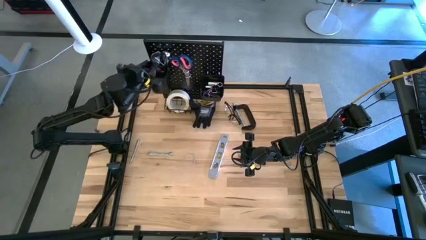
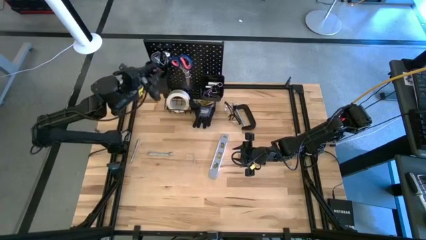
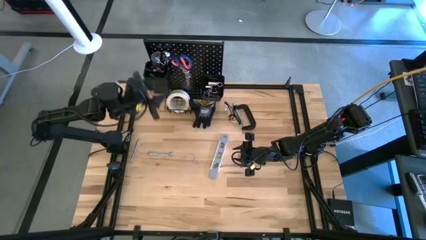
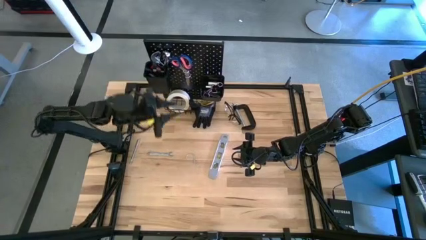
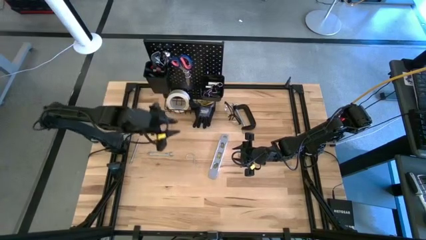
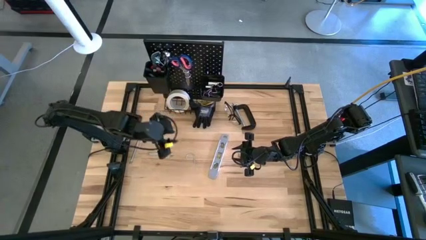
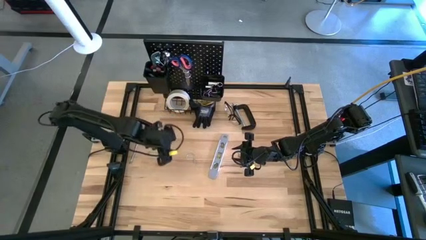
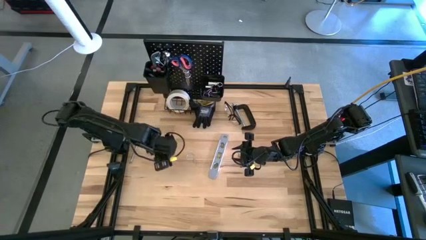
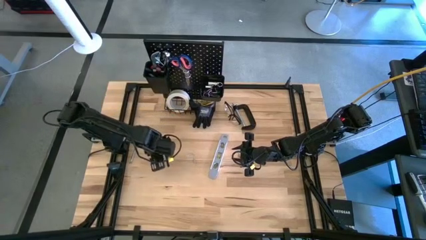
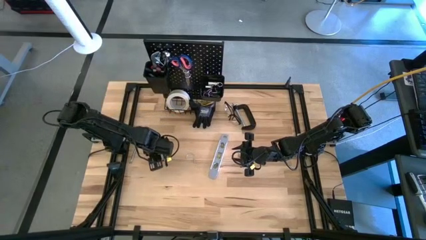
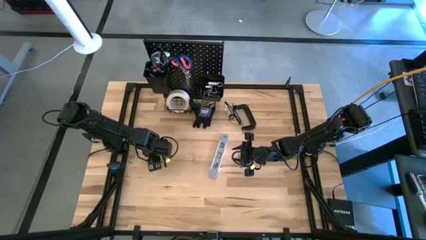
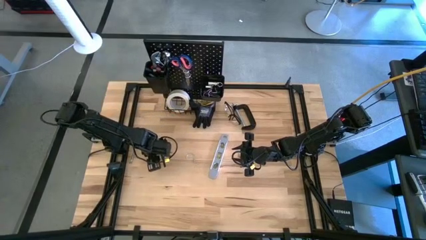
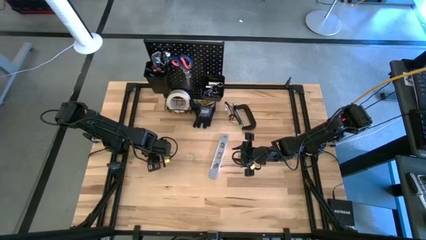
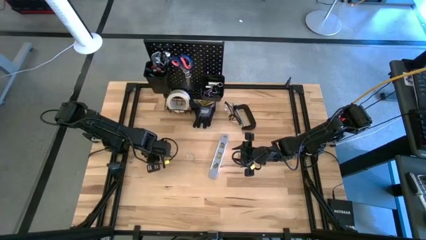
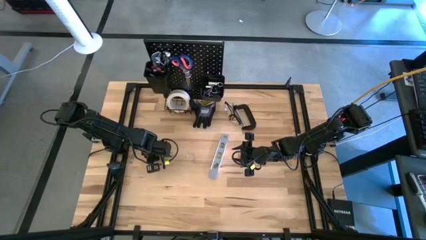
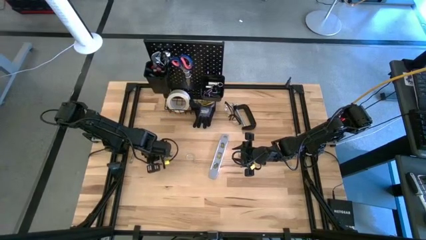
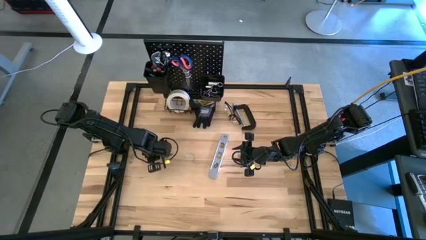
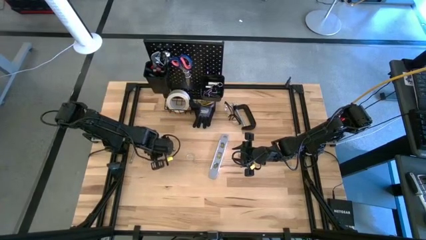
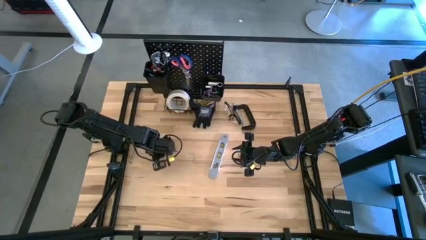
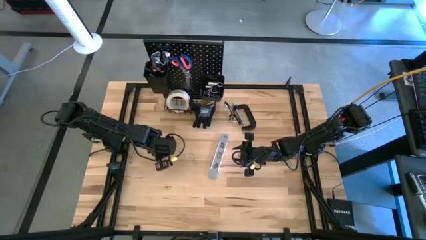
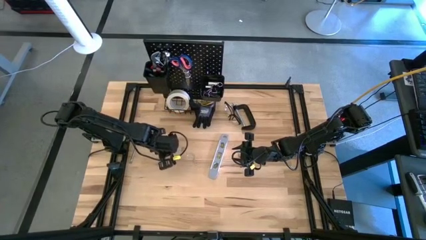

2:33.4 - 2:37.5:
Task: Hang tools onto peg board
Put the wrench into the left black bin on the pegboard

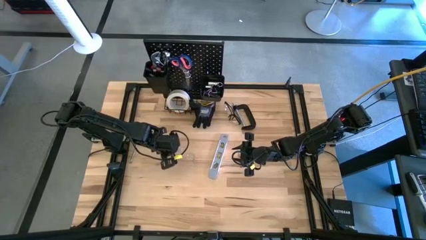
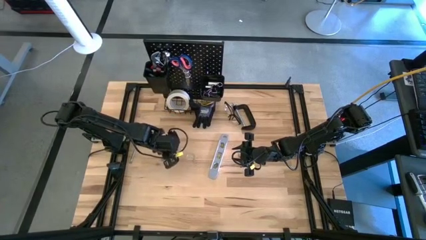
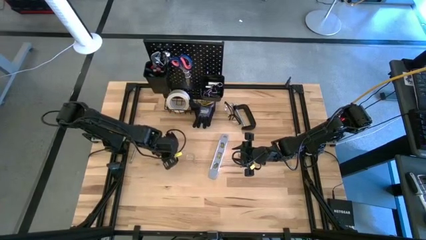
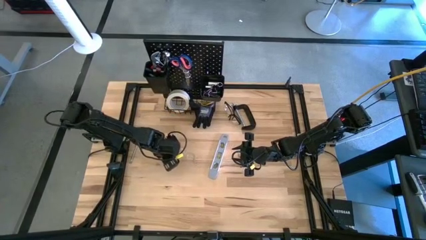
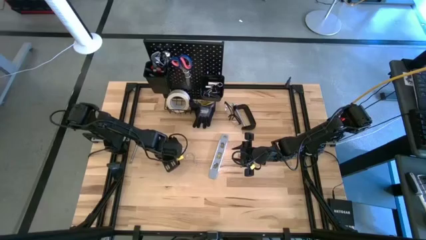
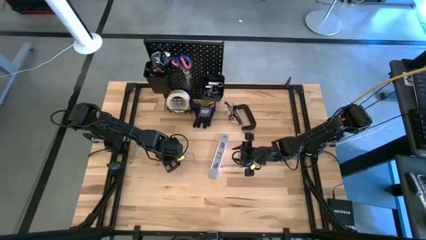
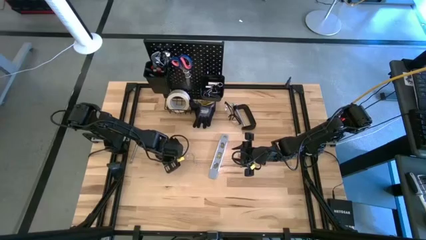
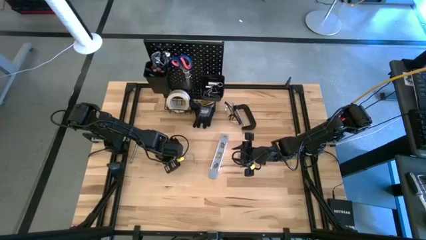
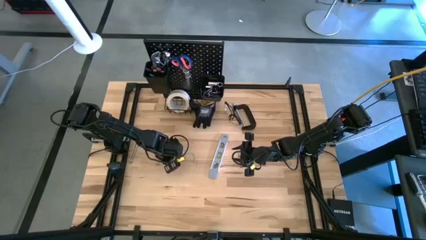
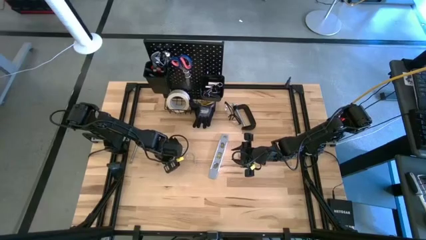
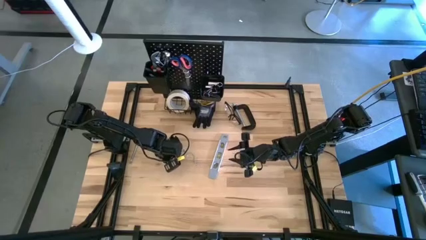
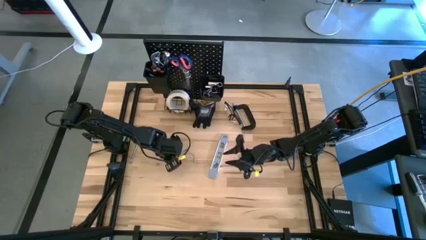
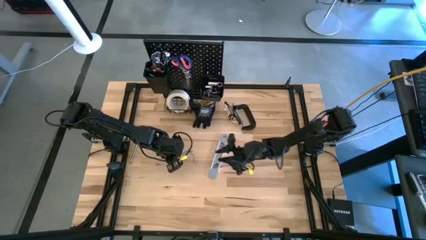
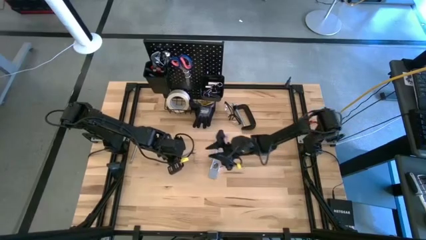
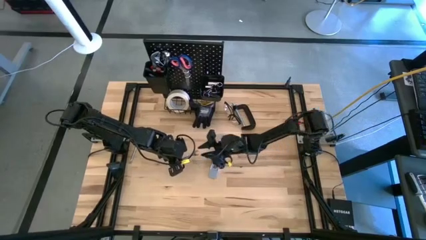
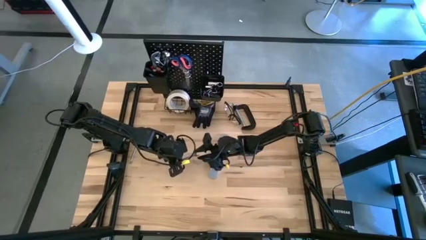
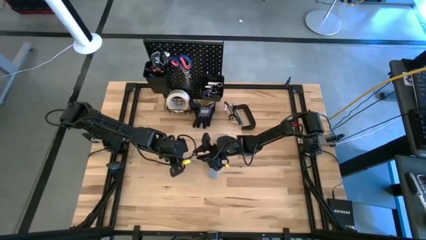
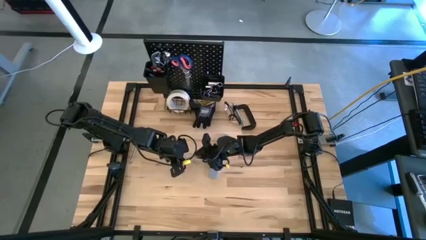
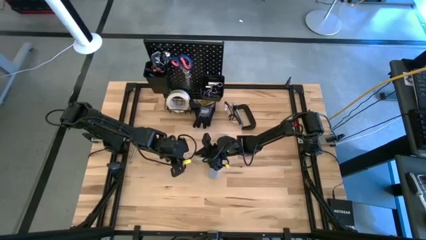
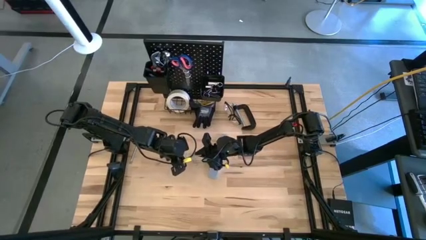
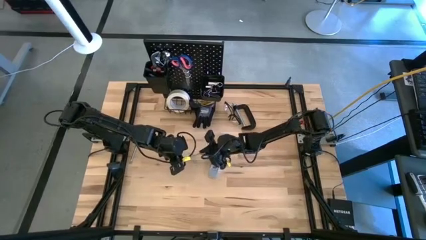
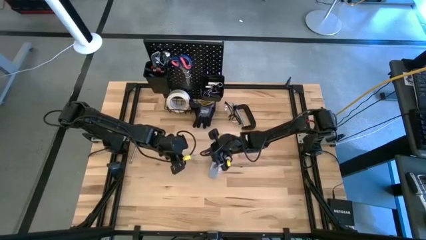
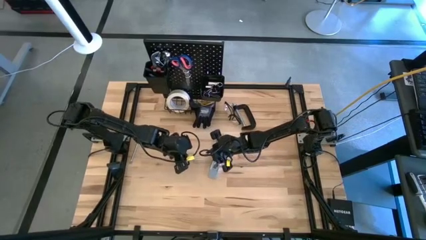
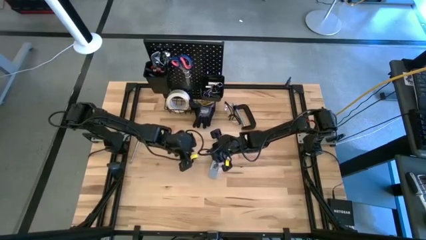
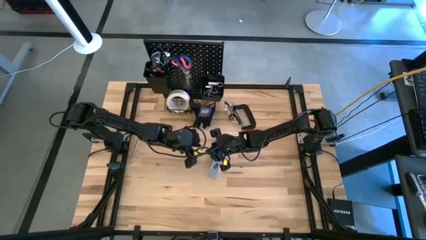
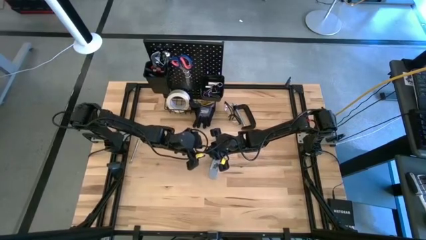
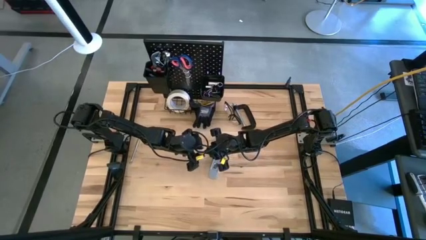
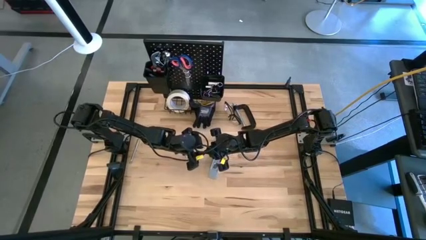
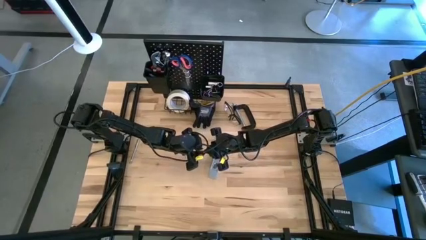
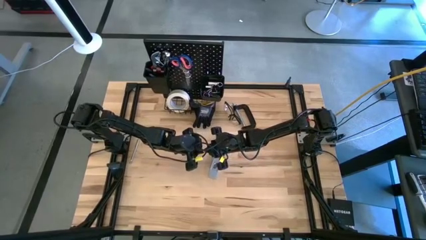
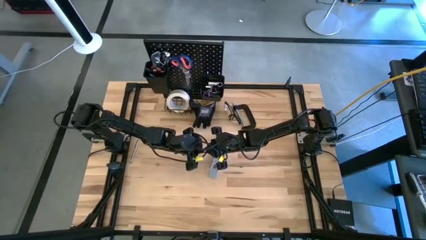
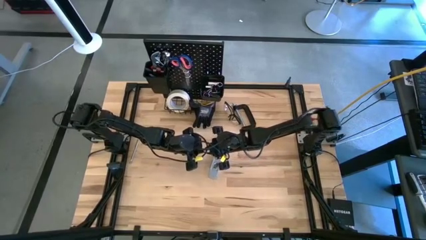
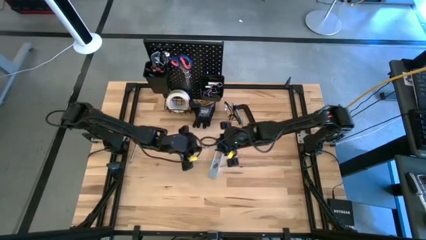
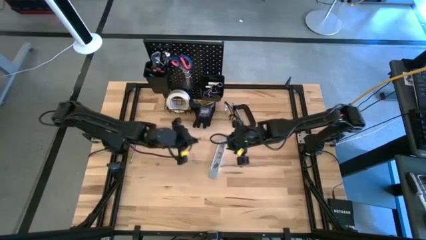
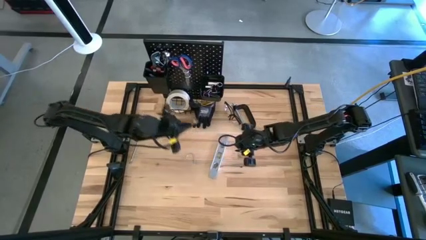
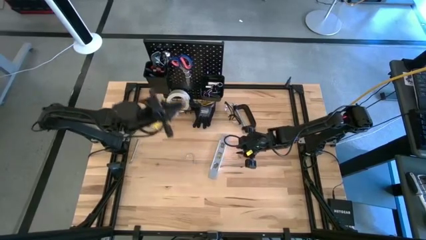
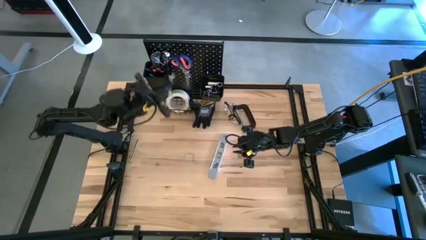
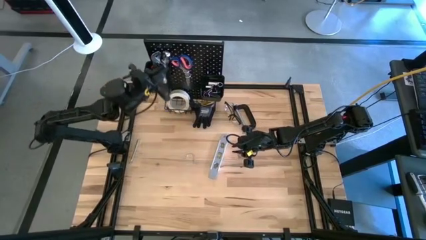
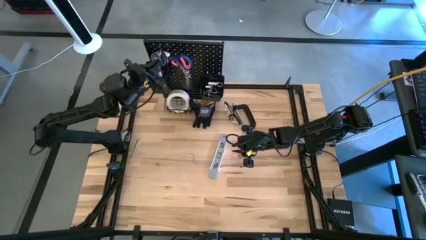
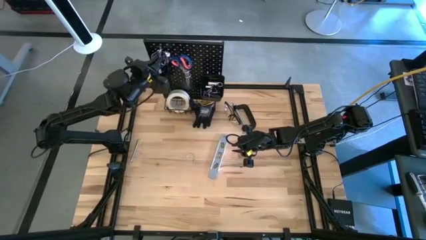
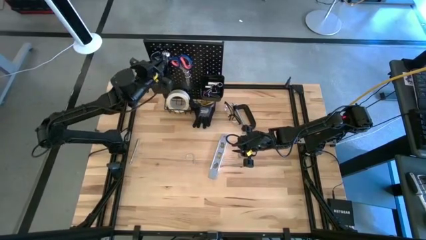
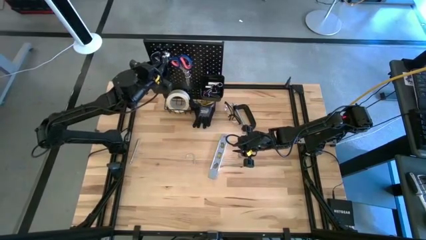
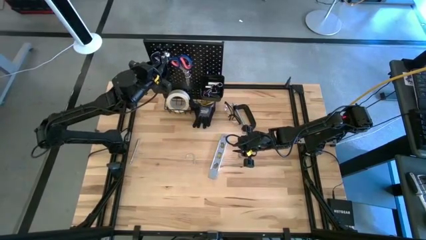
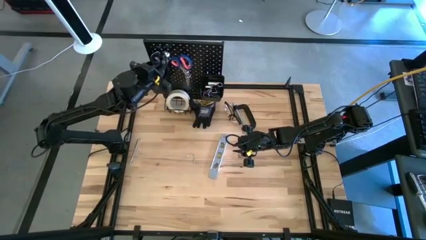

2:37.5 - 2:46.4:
Put the wrench into the left black bin on the pegboard

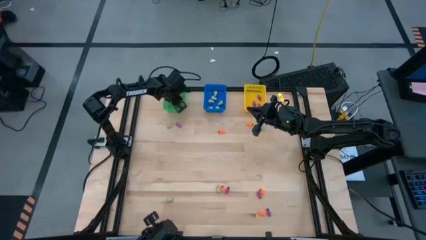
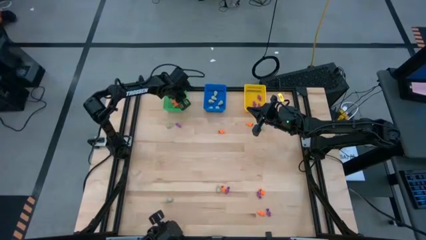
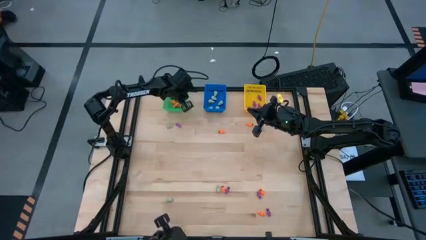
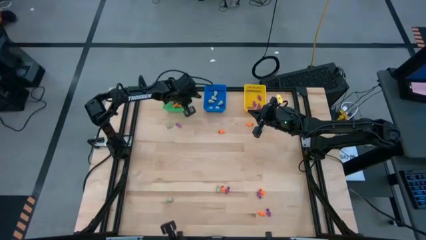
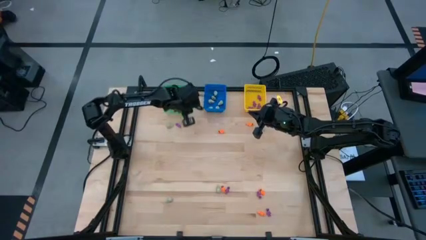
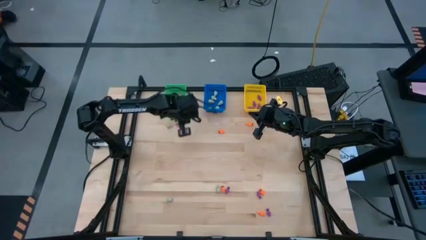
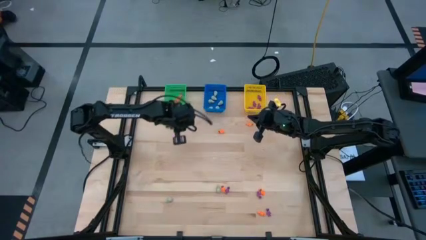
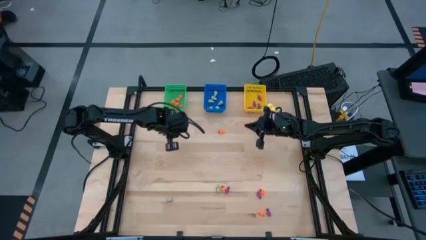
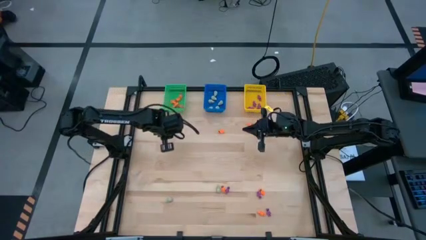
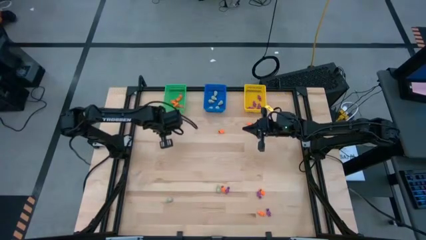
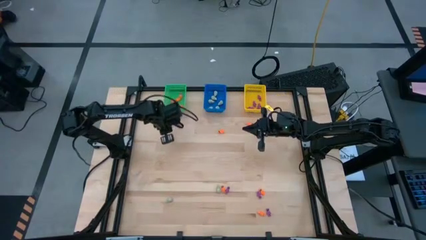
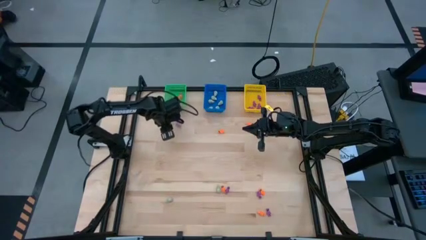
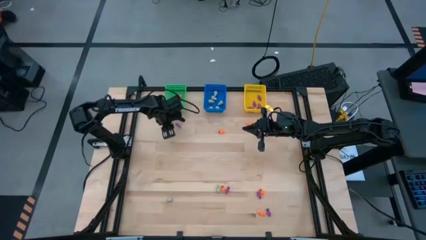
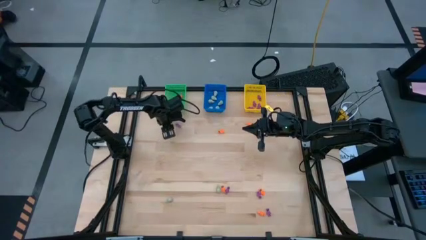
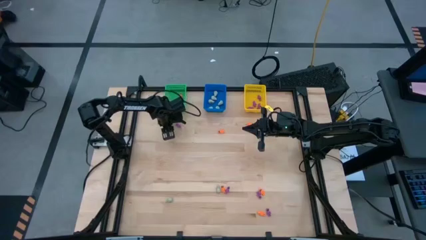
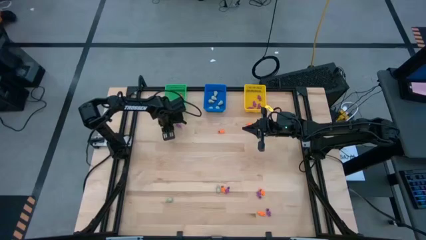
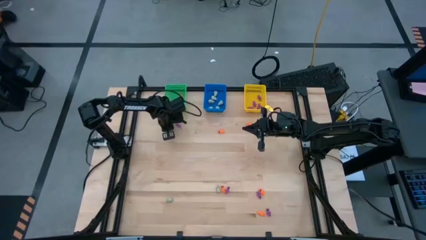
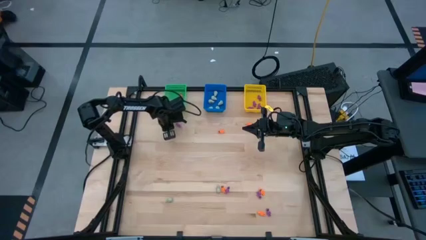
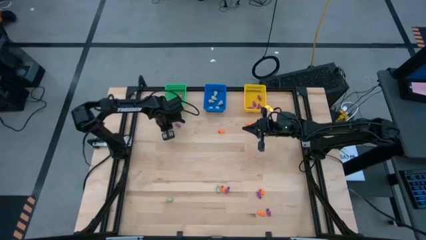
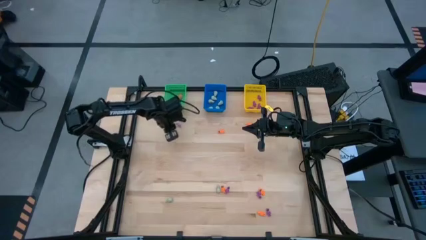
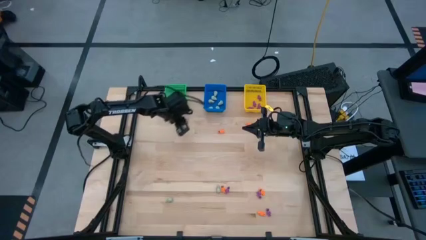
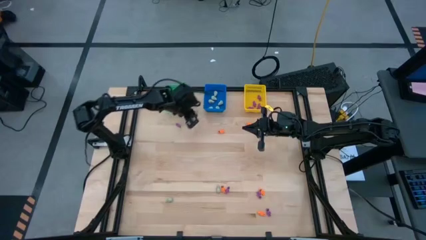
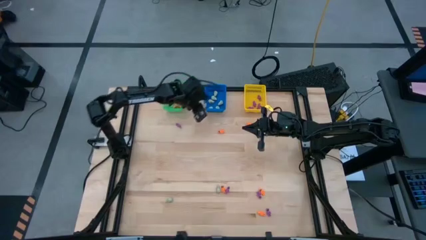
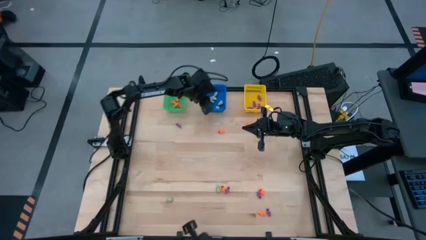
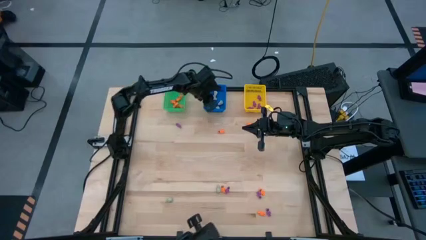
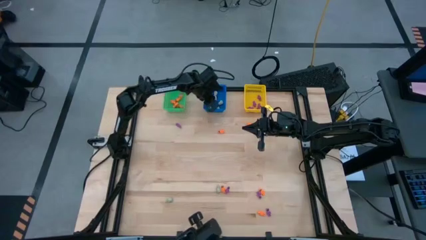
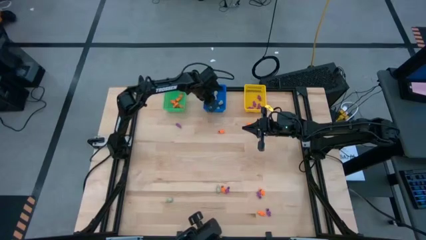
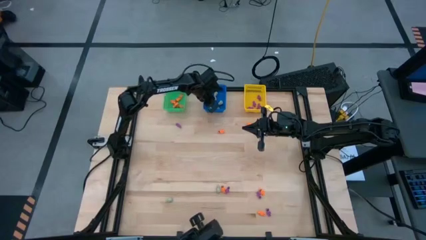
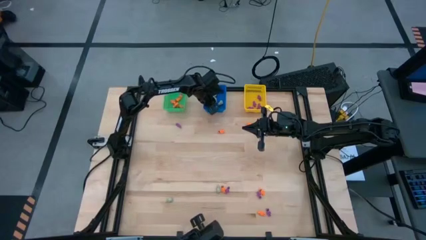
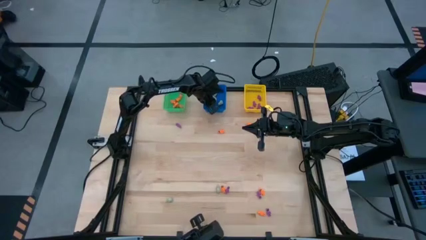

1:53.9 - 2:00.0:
Task: Sort Halloween decoration
Put the white skull toy into the blue bin
